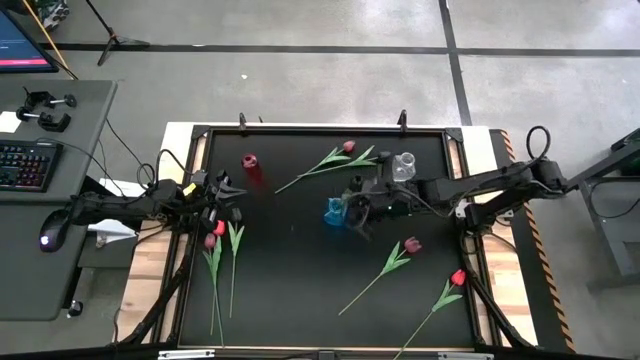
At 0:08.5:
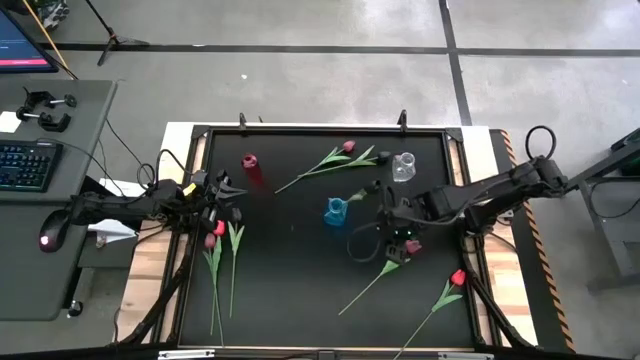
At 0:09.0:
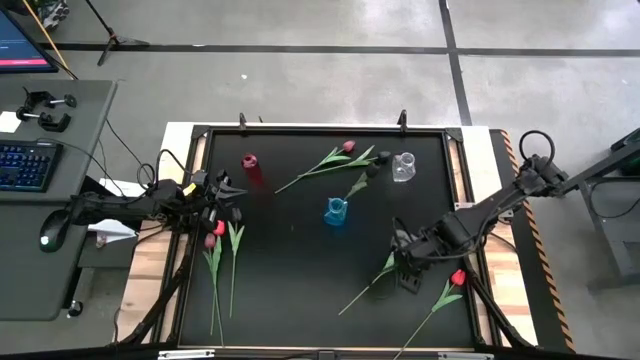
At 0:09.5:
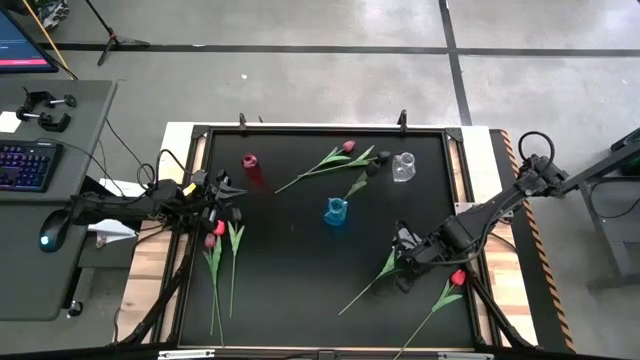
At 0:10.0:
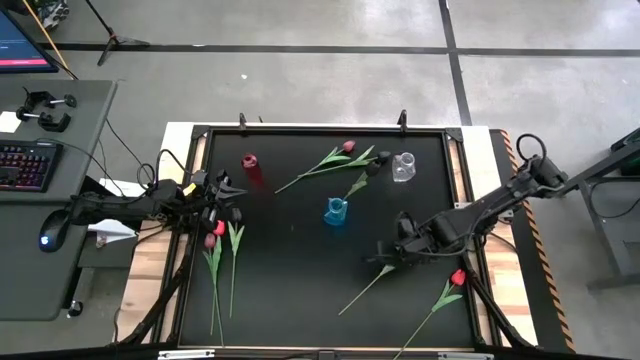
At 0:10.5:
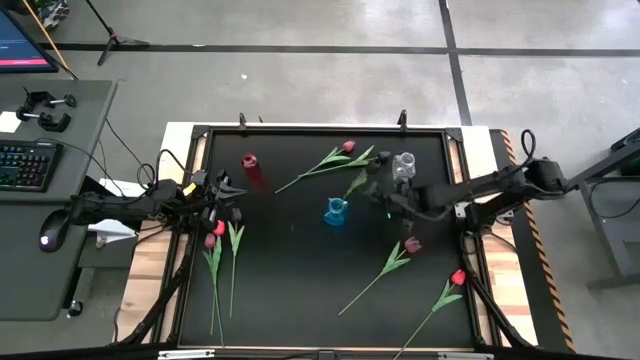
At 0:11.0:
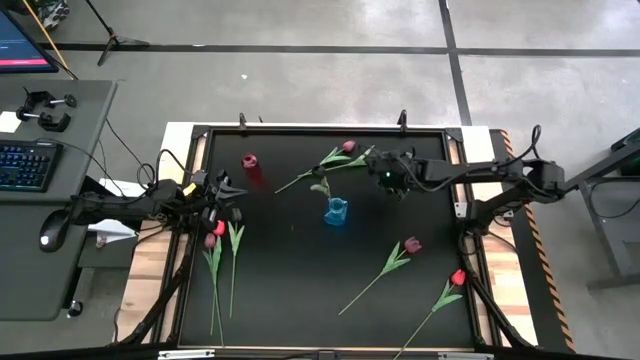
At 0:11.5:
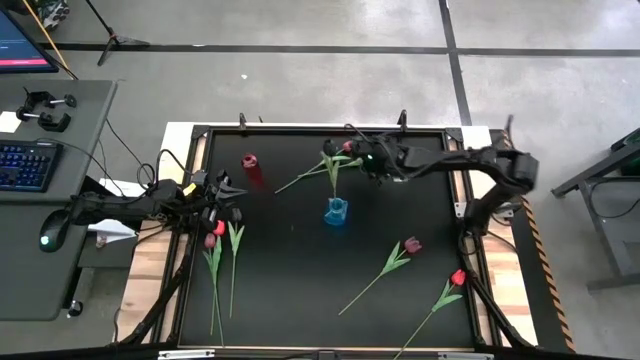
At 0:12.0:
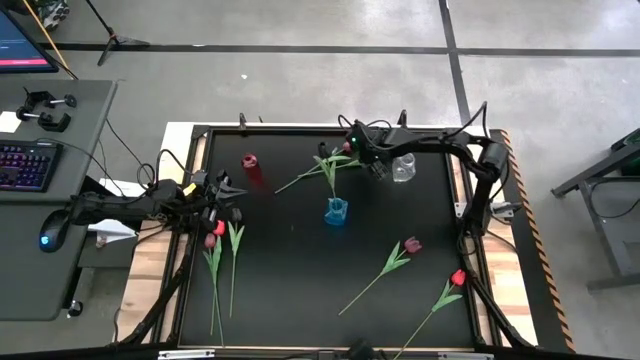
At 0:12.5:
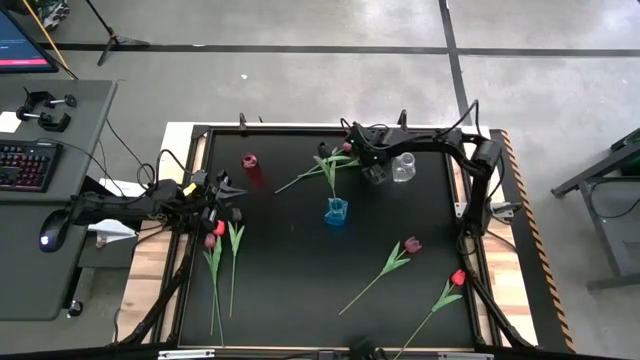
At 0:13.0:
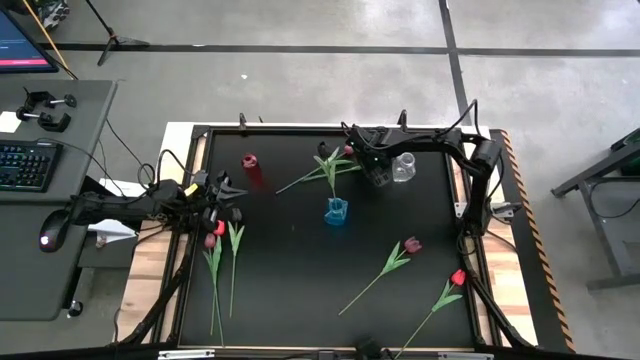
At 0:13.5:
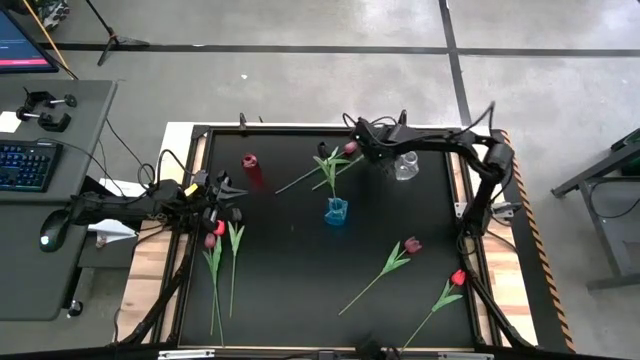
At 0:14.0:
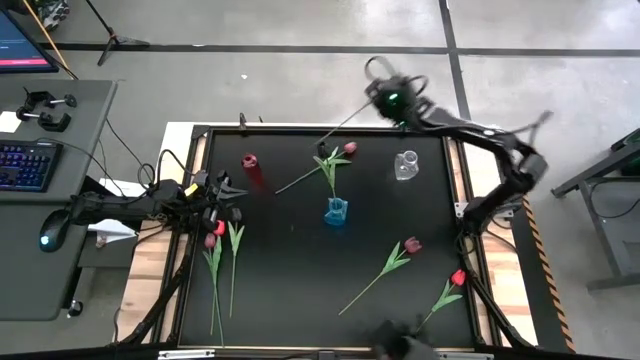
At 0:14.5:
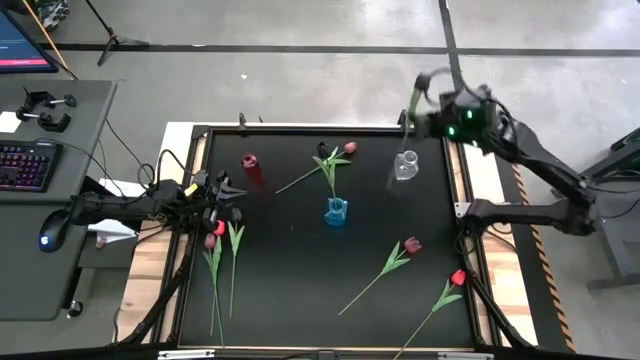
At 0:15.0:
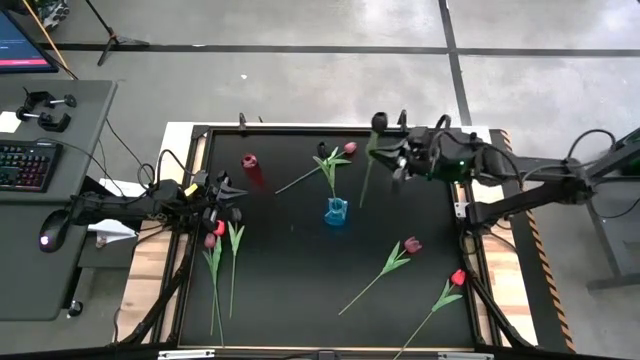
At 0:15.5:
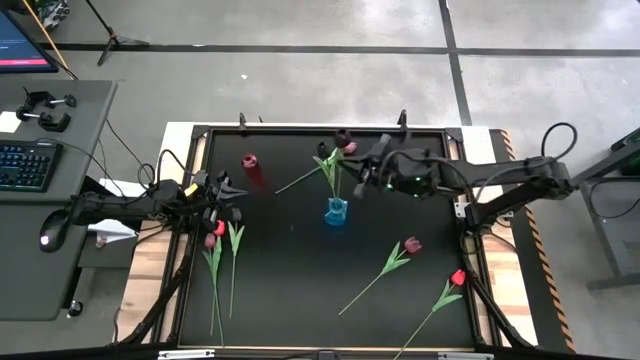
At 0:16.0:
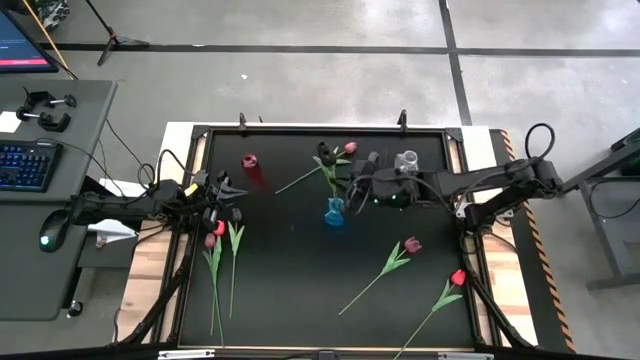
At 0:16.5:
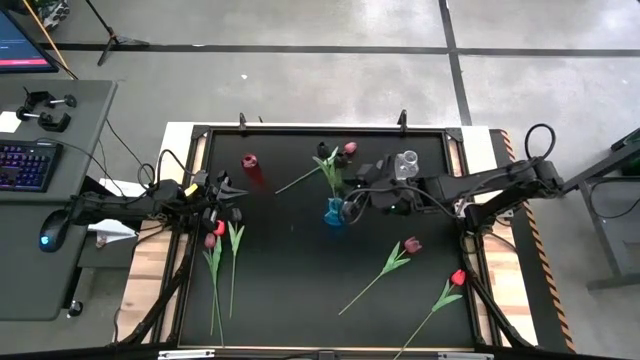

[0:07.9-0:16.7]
Task: Sort flowers into vase by color
Put the top black tulip into the blue flower vase

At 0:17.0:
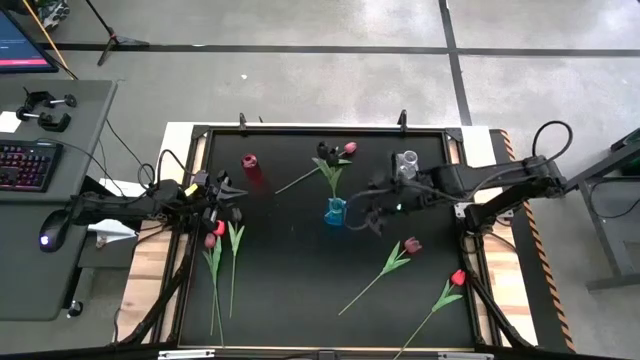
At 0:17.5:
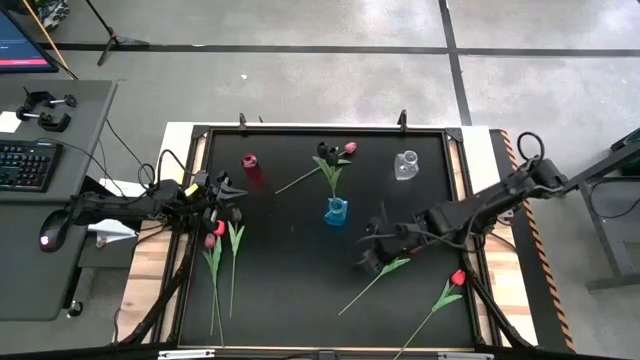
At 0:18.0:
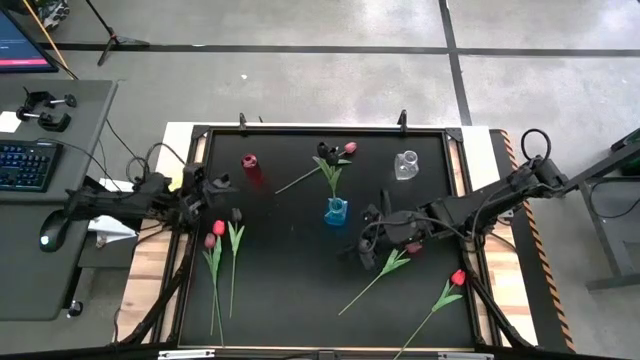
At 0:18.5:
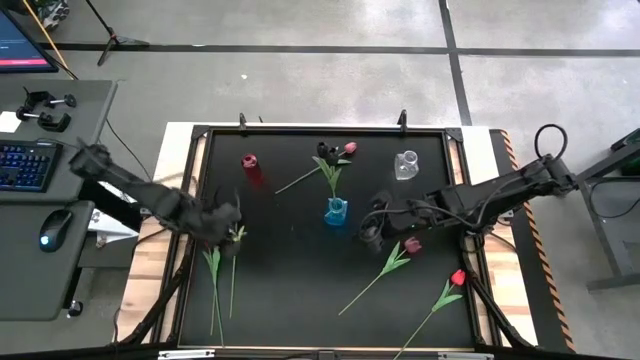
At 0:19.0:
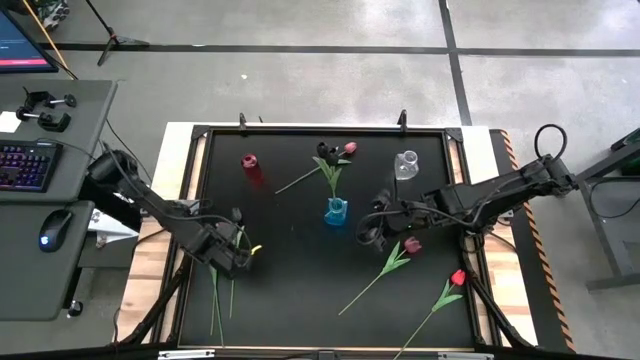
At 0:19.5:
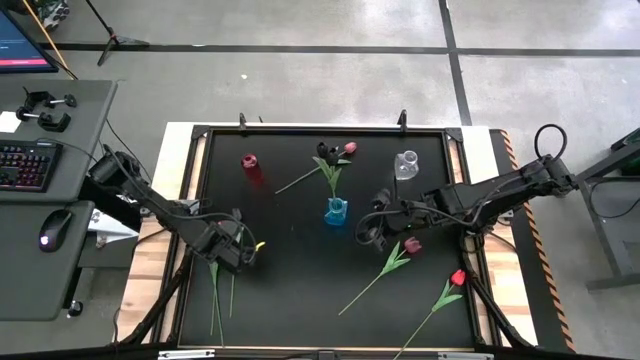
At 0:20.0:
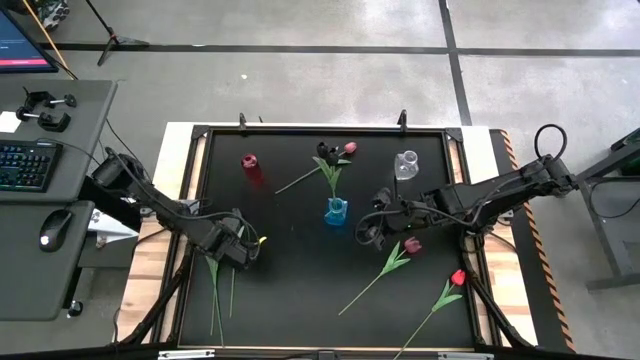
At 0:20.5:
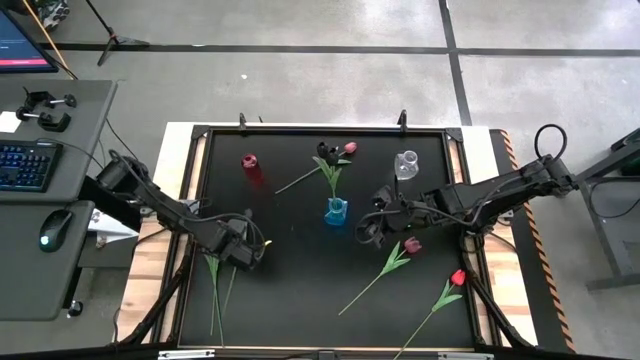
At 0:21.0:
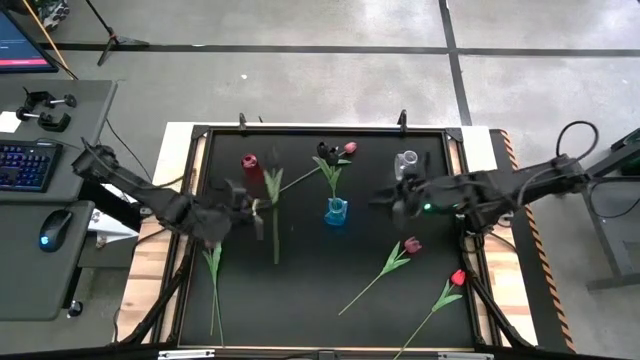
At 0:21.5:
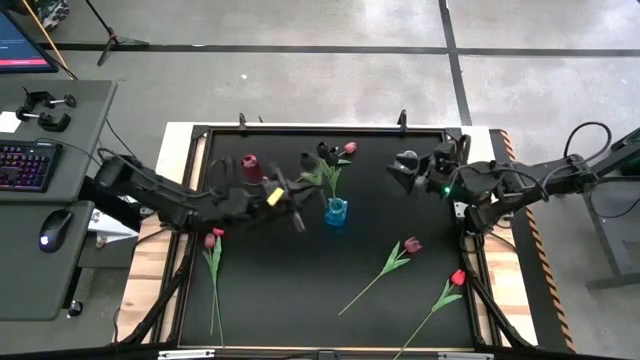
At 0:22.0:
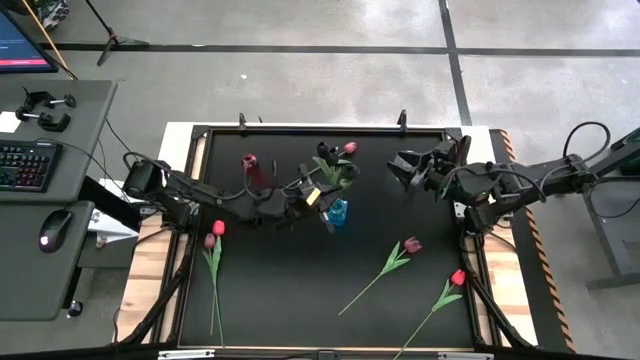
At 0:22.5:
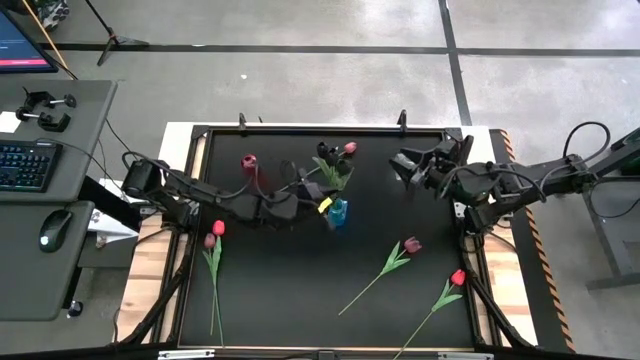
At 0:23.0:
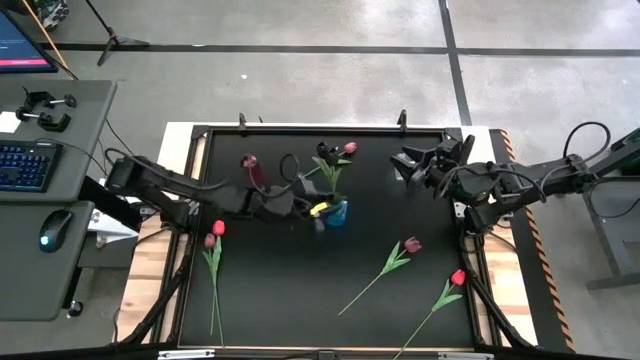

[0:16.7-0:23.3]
Put the black tulip into the blue flower vase

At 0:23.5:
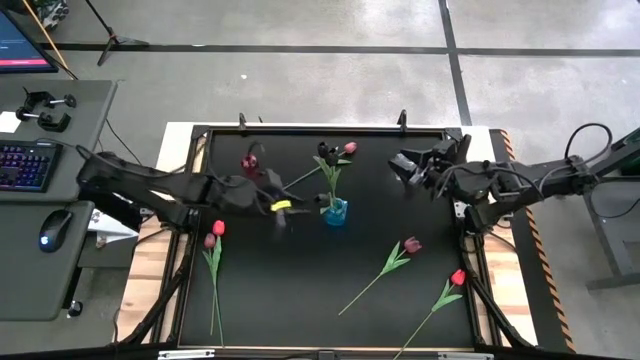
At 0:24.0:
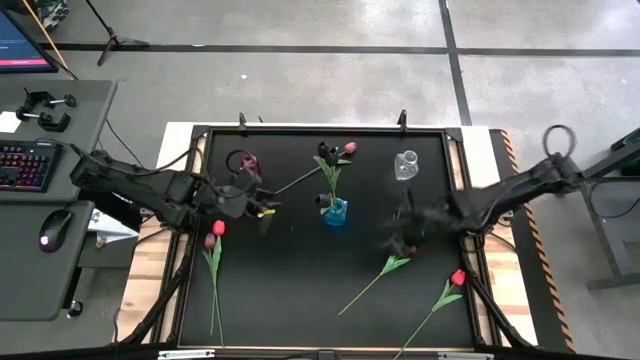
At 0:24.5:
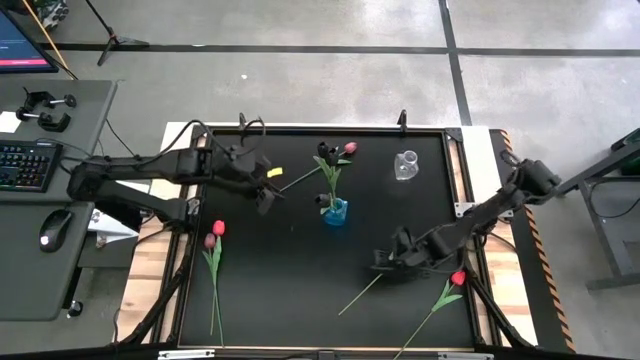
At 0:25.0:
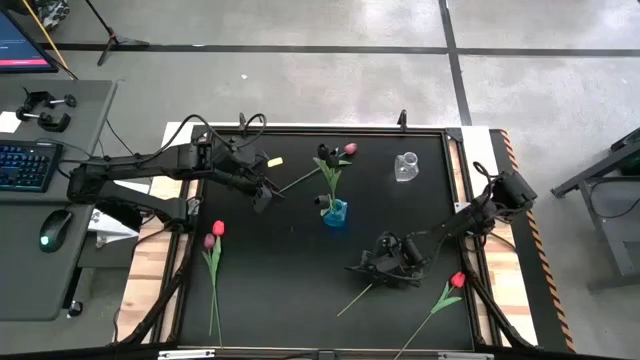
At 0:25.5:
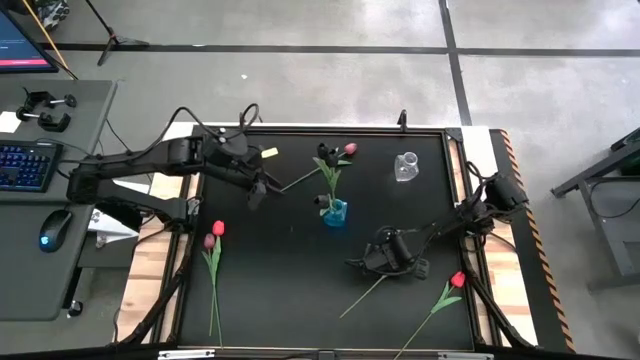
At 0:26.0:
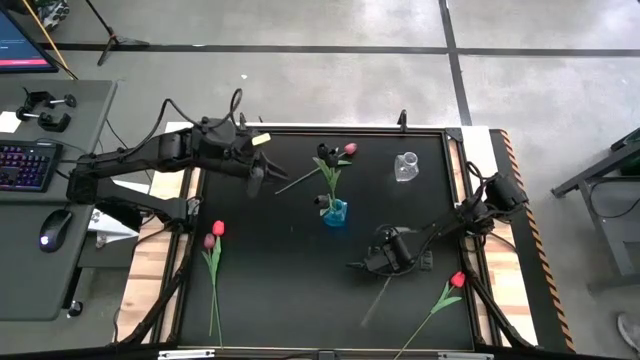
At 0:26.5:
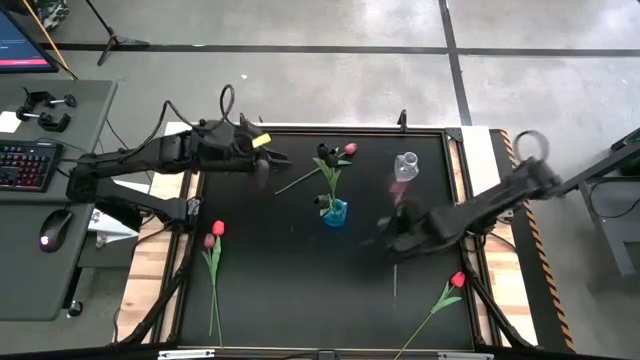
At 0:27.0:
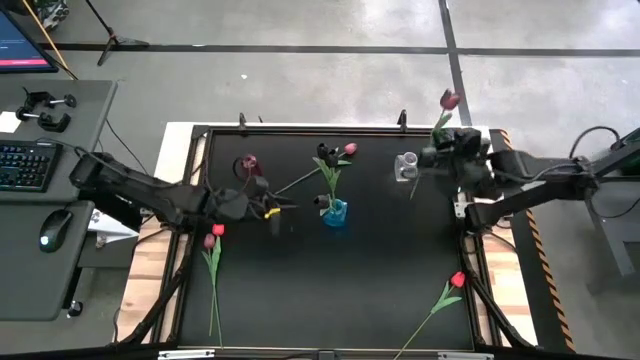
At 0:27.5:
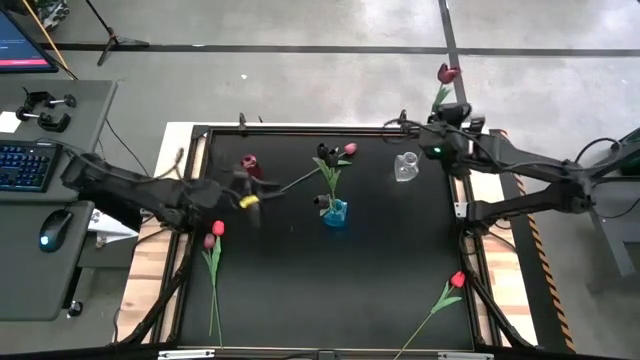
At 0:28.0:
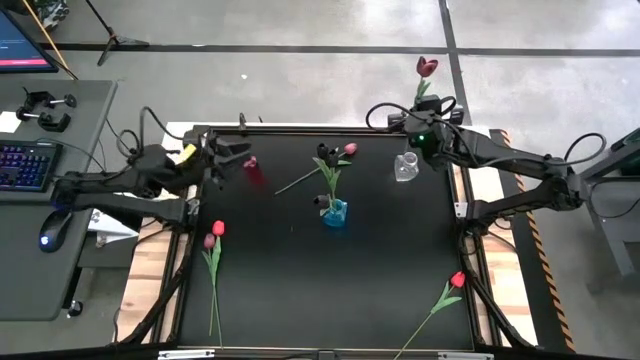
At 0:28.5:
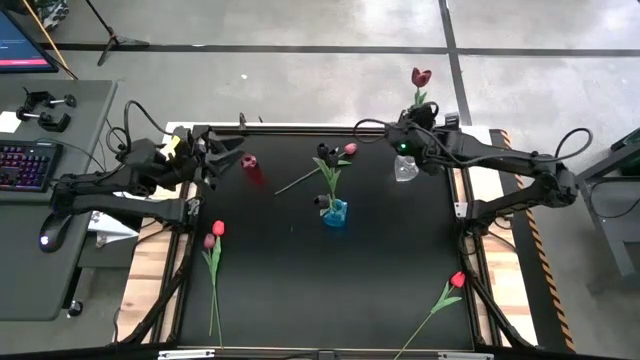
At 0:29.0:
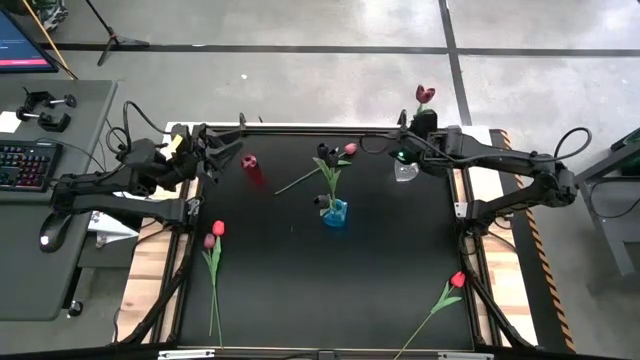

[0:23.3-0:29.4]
Put the right red tulip into the transparent flower vase
